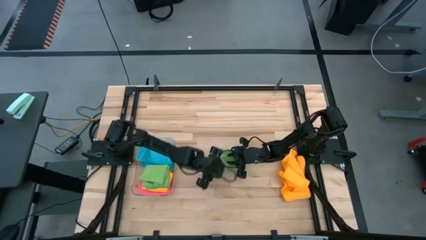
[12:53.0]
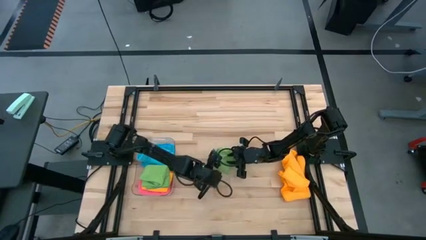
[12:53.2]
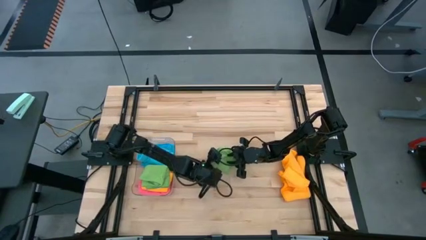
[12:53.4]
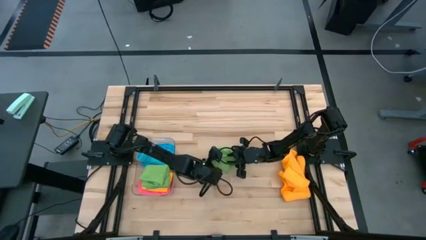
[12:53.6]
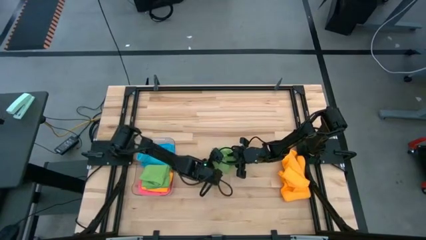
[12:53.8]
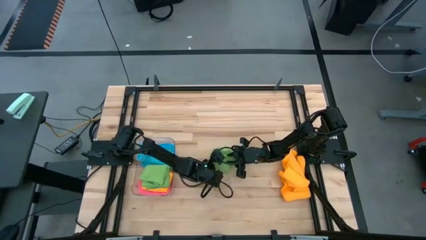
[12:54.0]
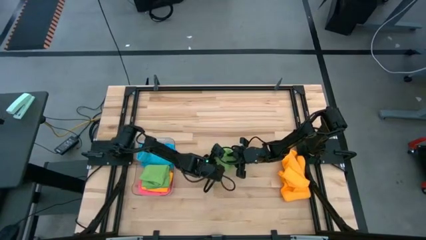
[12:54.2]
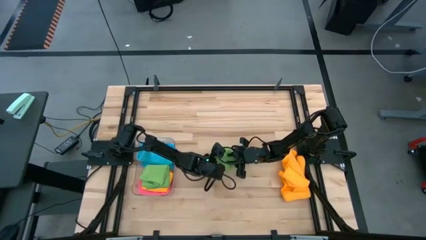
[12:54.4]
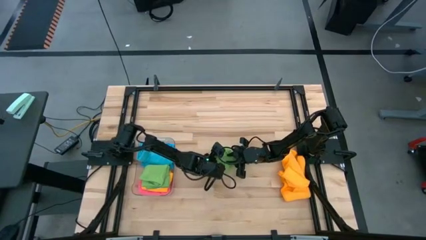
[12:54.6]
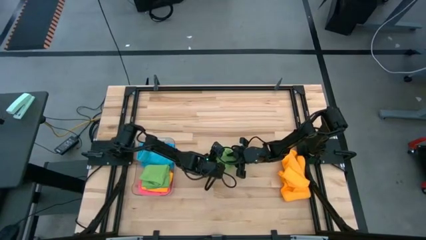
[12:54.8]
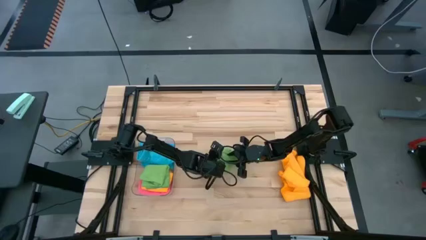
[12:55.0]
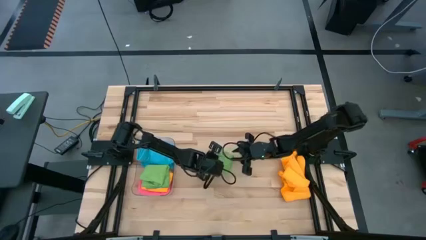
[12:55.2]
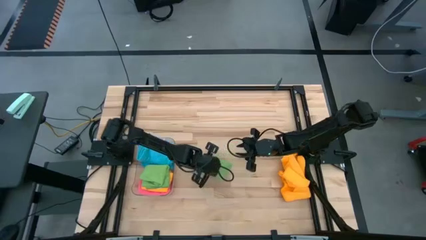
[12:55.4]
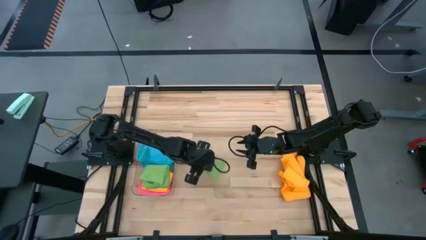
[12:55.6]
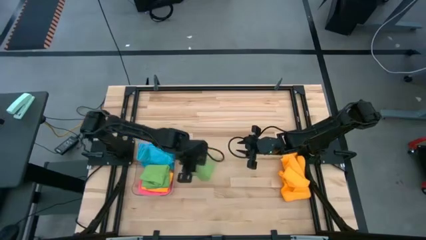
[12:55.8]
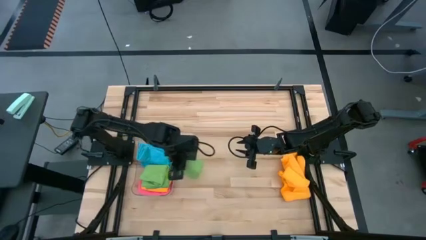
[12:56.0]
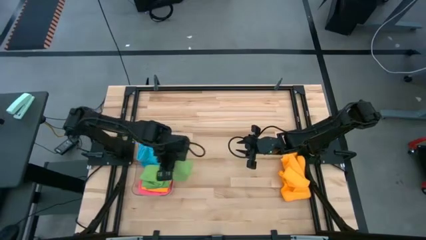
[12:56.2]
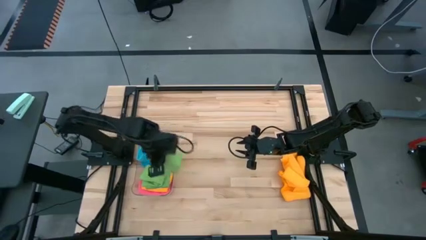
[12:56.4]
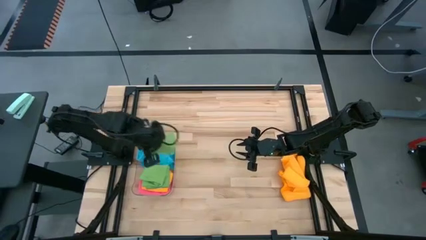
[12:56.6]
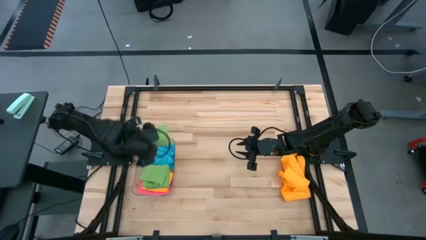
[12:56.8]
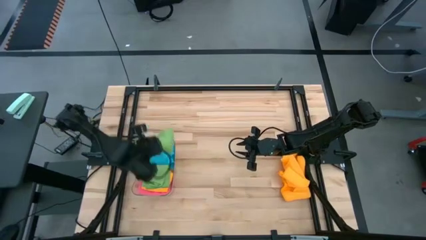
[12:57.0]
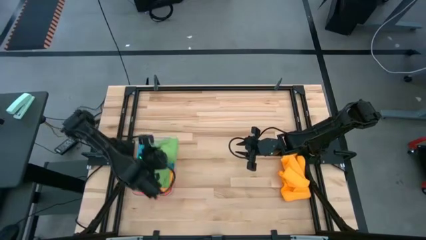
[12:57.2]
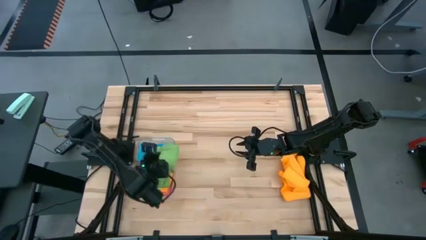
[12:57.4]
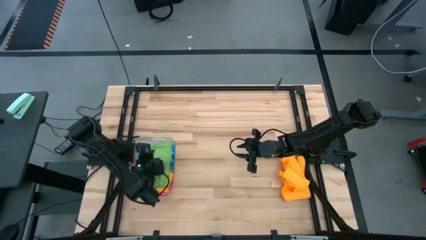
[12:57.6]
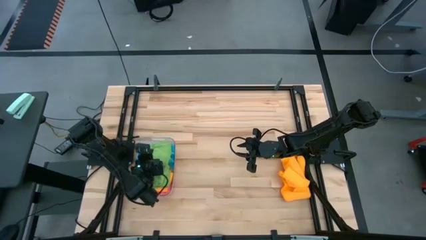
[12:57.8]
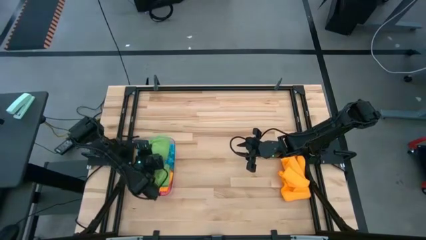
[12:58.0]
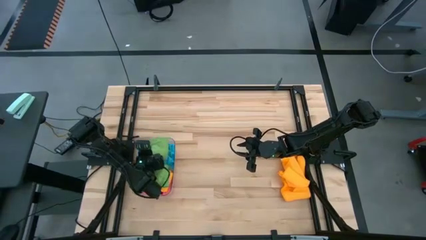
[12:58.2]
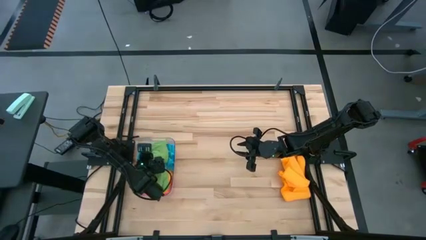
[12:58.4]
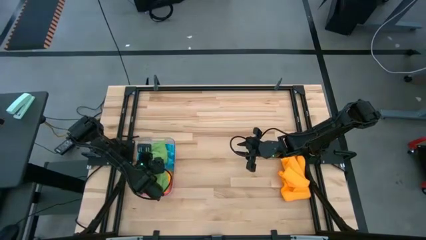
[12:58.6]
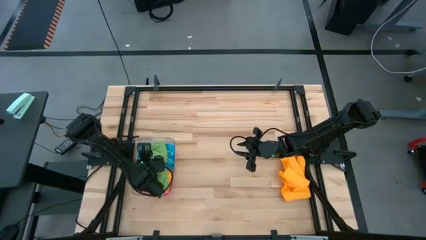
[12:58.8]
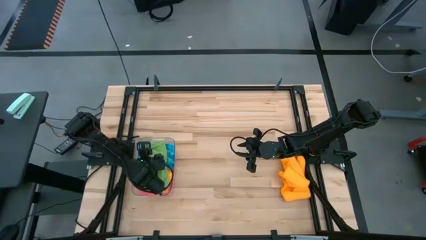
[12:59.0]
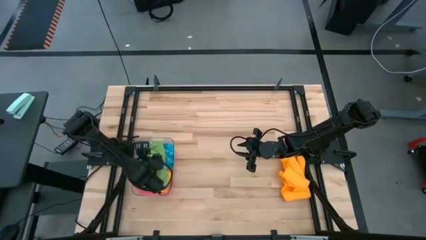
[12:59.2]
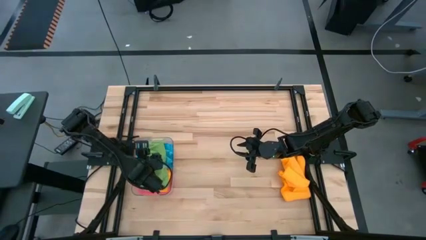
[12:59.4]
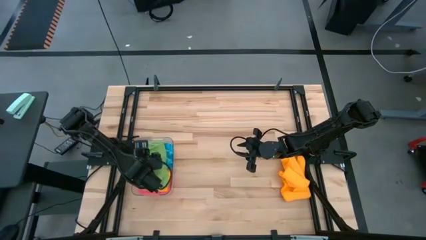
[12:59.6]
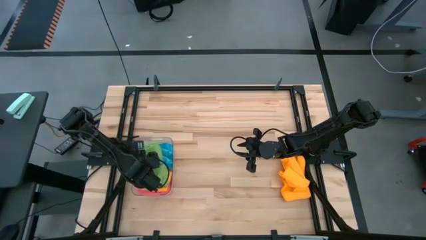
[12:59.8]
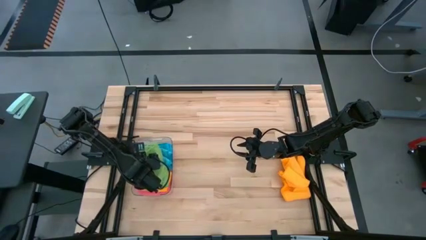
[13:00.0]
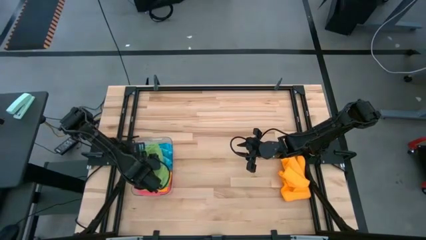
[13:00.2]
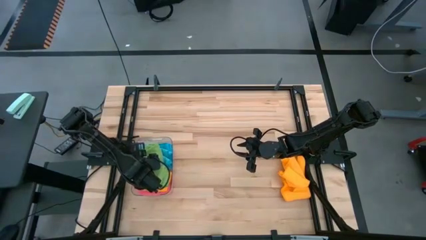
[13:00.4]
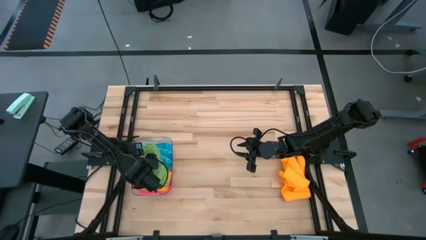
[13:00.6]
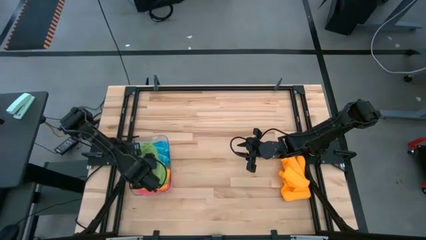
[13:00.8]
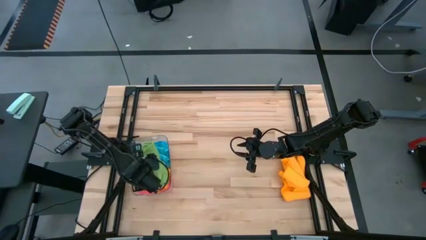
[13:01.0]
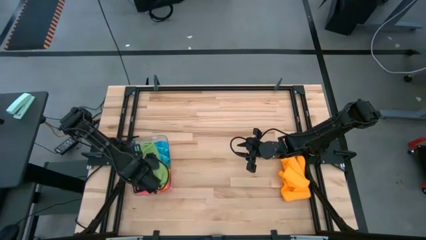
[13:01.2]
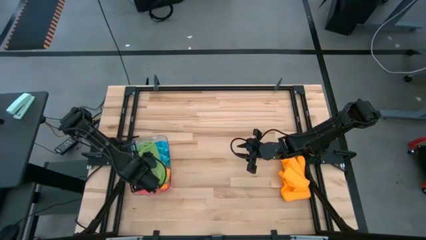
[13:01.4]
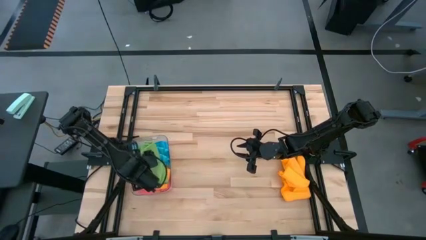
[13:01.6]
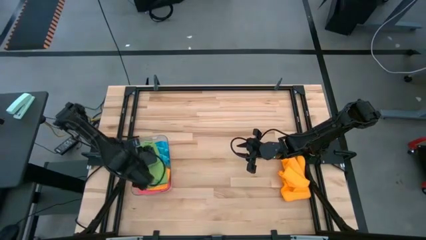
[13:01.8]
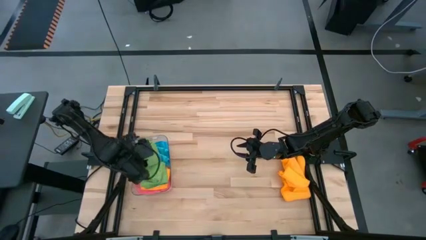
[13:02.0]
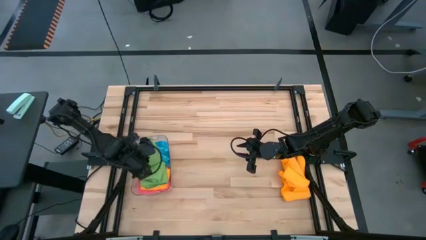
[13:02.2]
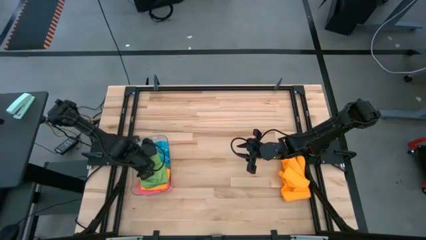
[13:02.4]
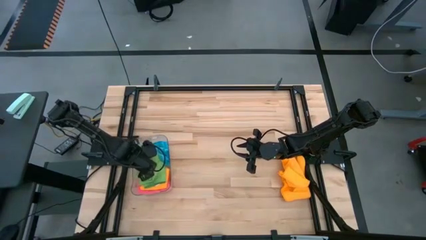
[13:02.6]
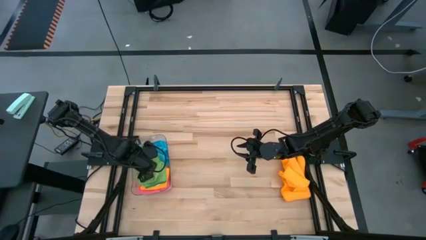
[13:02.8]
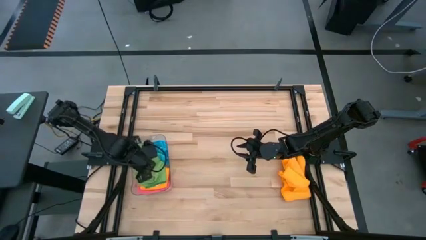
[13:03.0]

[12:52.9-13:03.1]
Task: Fold microfiber towels
Put the green microfiber cloth into the transparent bin

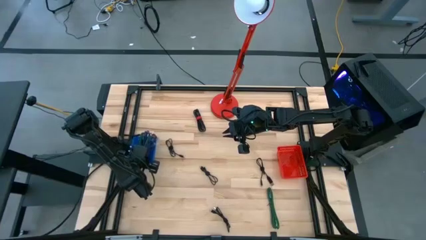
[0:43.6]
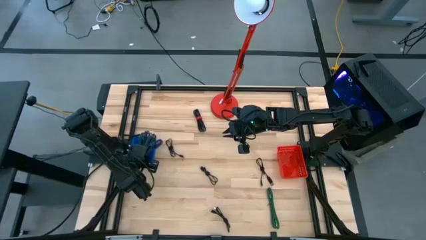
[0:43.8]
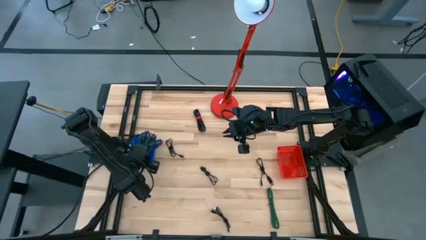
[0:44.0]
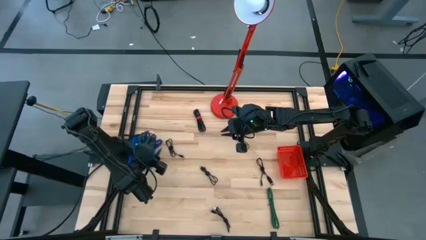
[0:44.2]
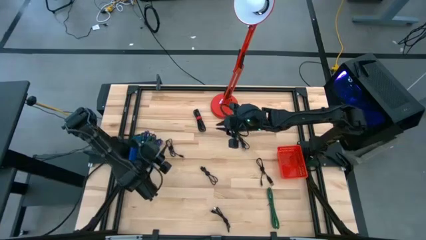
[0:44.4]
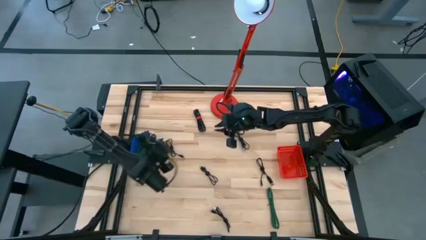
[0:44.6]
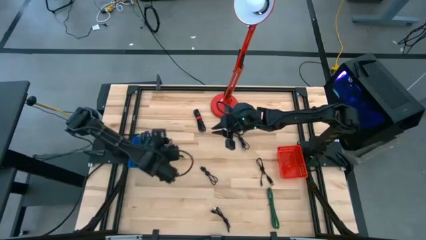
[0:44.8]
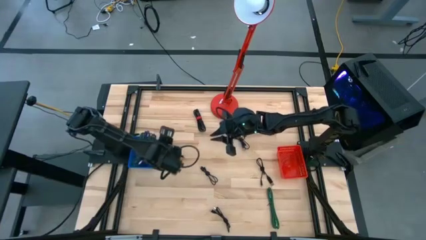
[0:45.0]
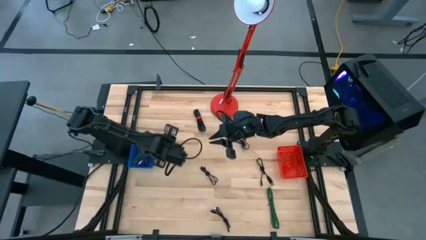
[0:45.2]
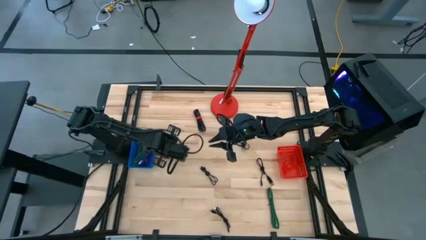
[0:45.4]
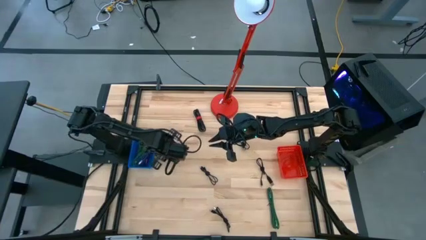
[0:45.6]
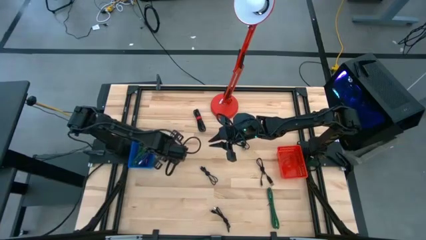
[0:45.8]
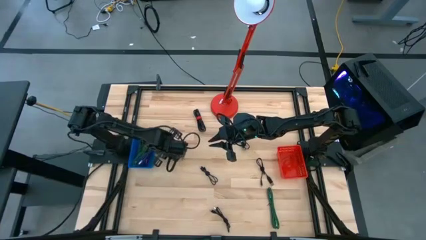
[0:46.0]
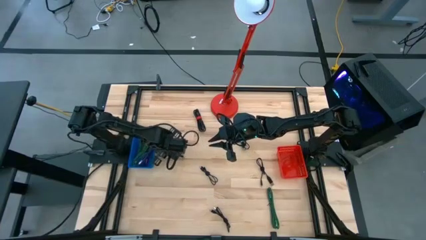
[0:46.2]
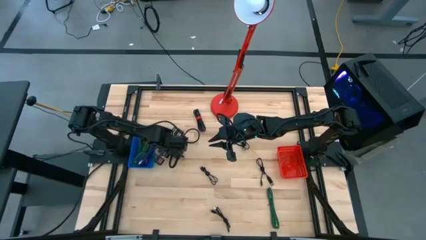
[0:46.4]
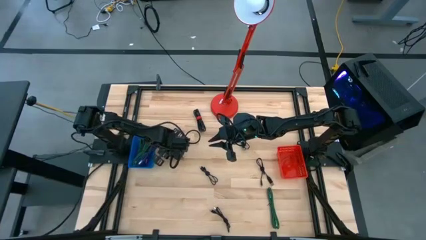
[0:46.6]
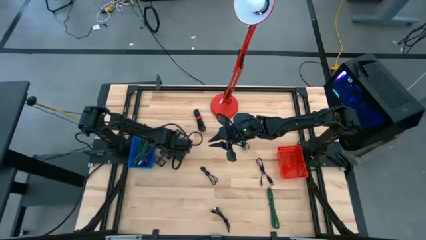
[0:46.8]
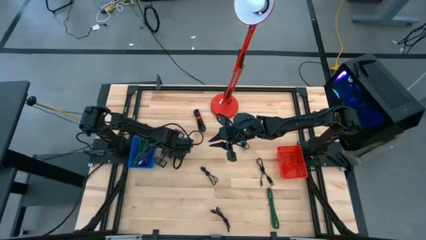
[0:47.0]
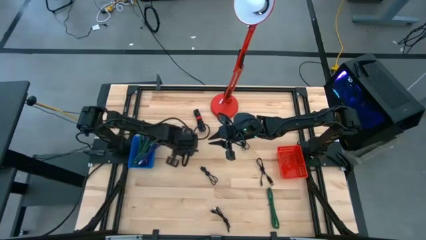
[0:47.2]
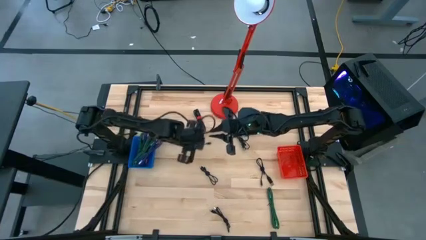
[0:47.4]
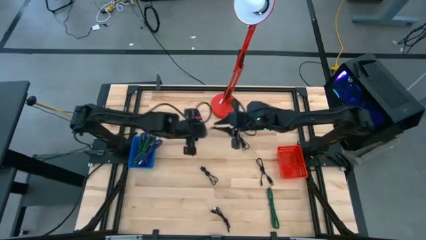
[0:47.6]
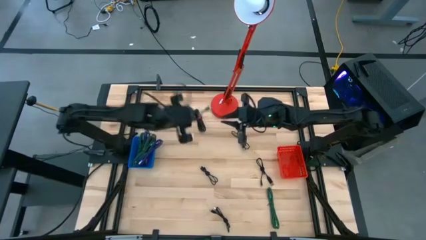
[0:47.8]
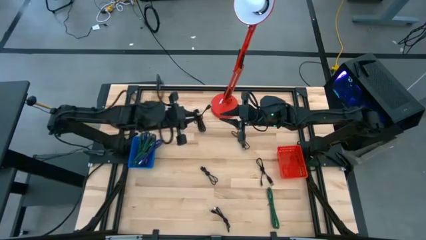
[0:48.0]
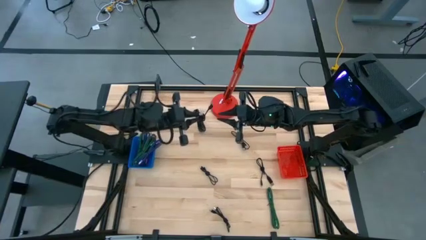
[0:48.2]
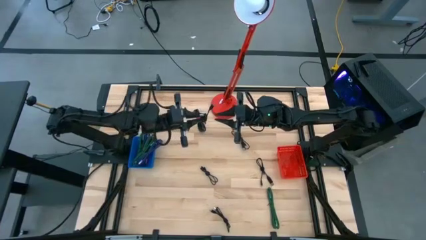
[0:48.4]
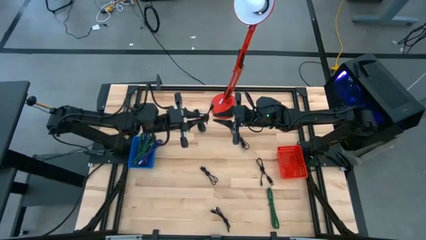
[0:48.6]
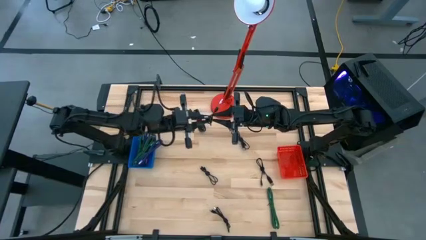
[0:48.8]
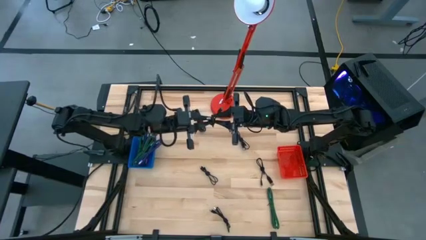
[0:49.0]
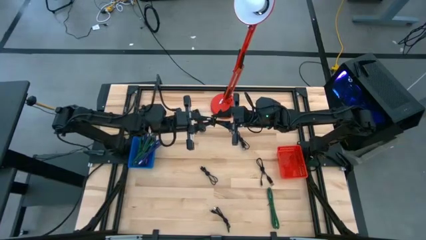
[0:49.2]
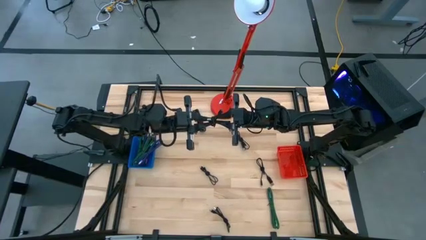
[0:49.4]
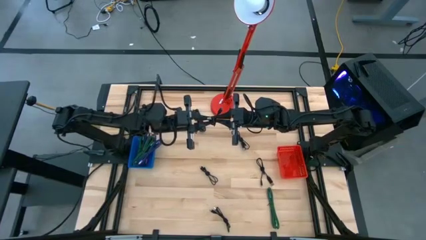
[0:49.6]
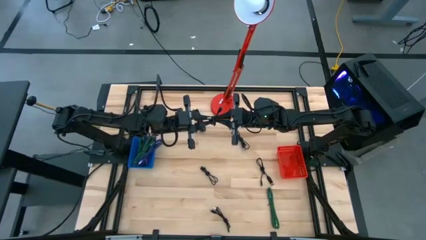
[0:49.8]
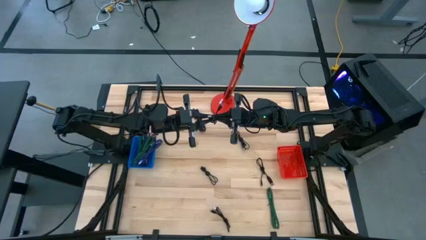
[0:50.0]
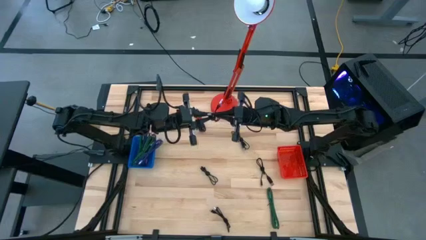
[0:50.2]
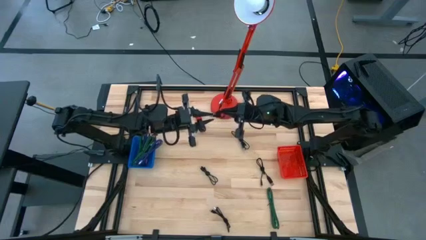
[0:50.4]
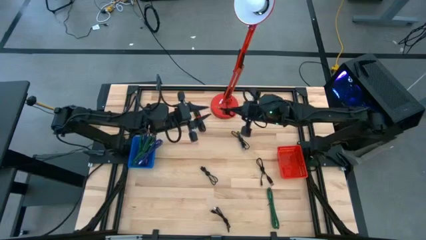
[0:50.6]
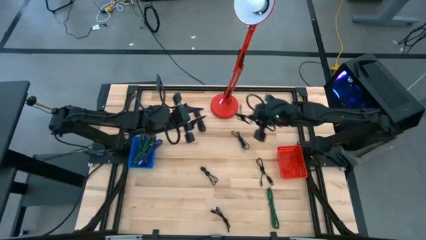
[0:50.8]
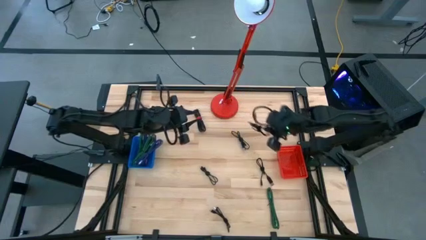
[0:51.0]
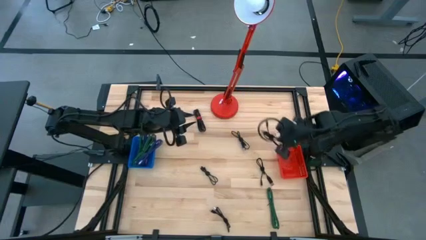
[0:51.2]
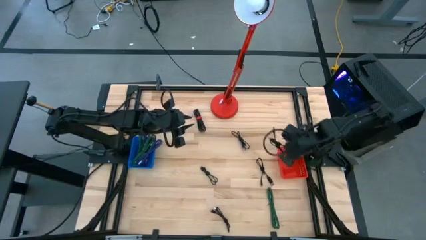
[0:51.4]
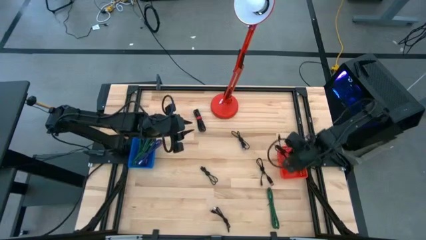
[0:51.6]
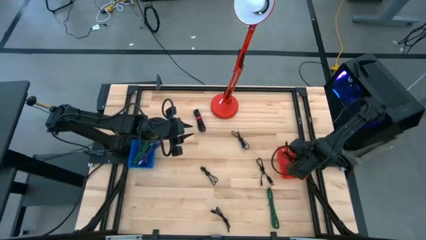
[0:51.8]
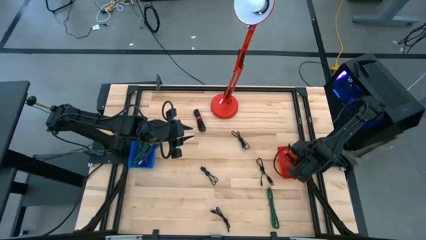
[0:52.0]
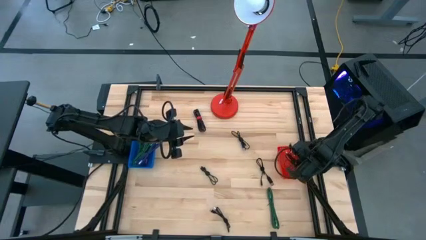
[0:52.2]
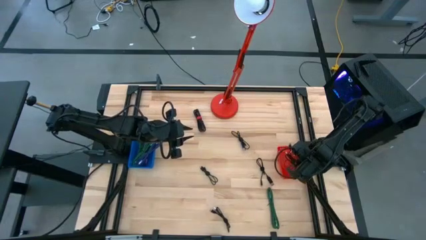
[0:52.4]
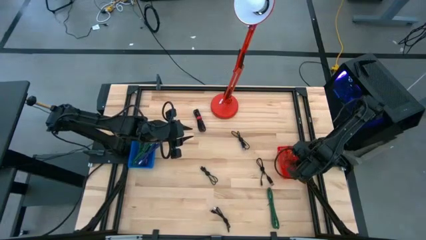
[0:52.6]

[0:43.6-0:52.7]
Task: Pick & Place USB Port
Put the black charger cable into the red bin
